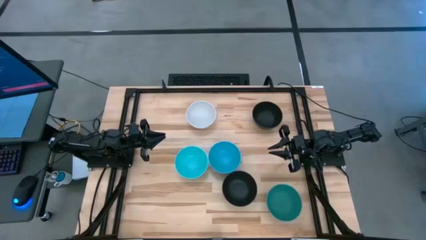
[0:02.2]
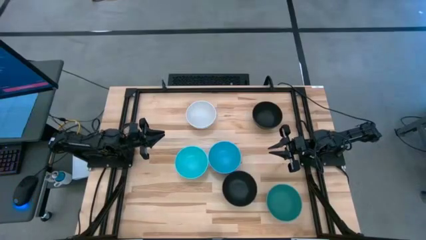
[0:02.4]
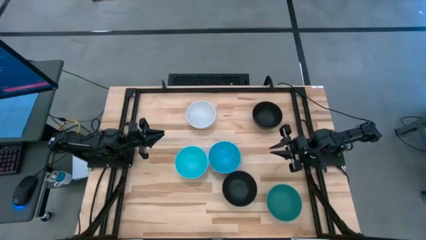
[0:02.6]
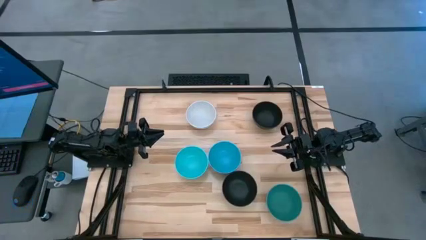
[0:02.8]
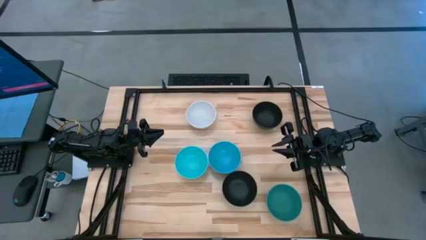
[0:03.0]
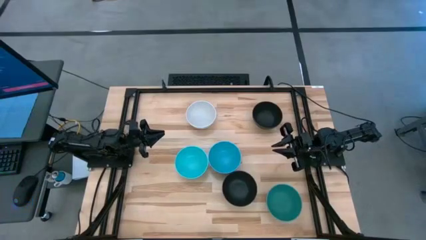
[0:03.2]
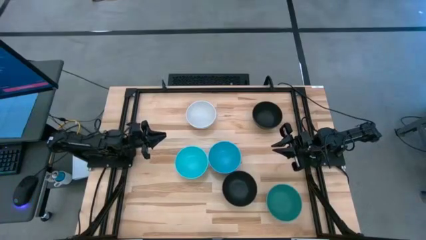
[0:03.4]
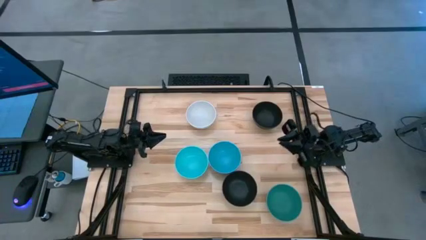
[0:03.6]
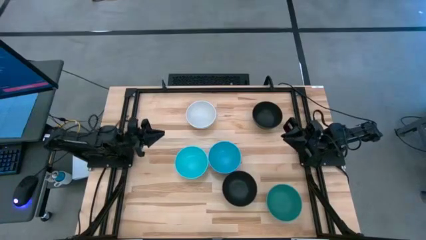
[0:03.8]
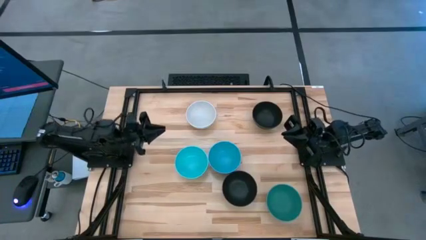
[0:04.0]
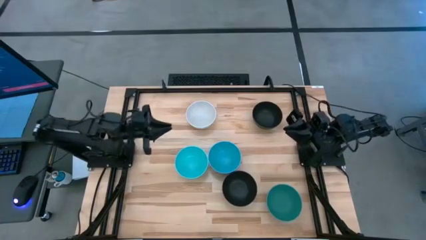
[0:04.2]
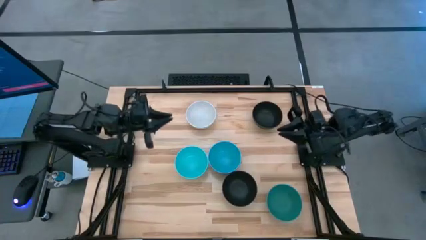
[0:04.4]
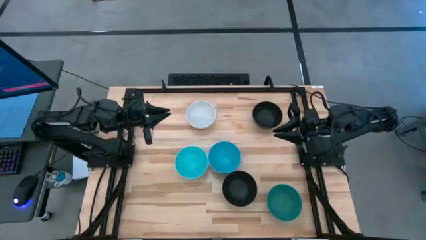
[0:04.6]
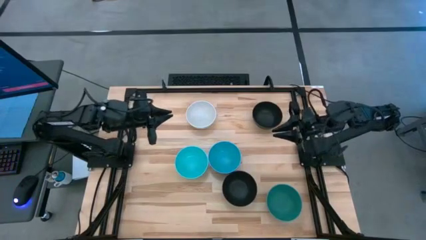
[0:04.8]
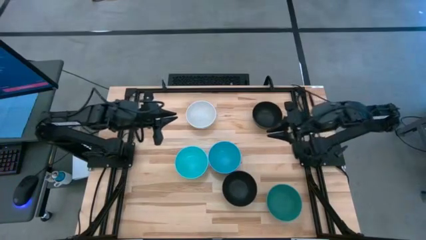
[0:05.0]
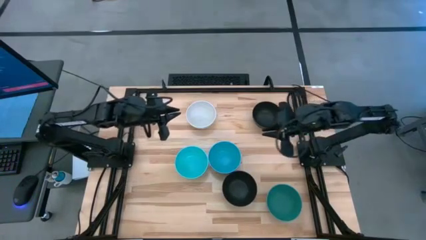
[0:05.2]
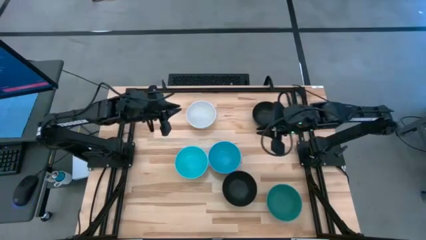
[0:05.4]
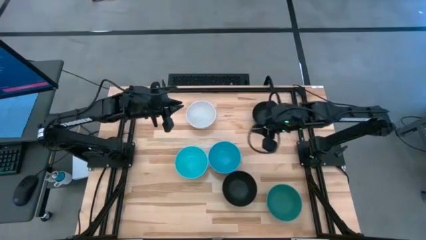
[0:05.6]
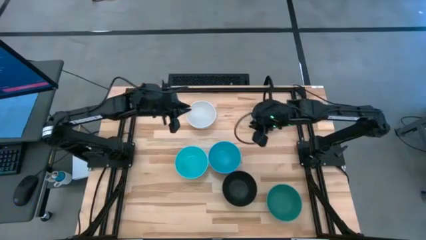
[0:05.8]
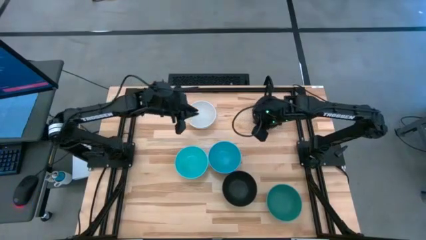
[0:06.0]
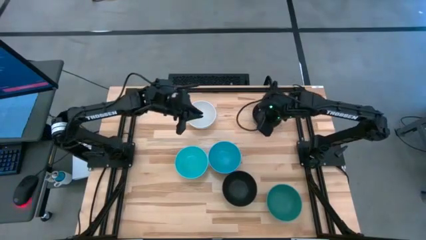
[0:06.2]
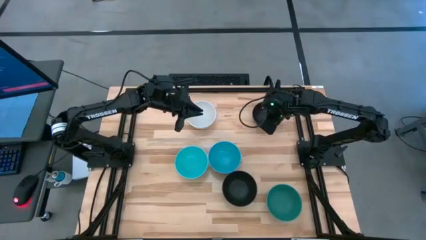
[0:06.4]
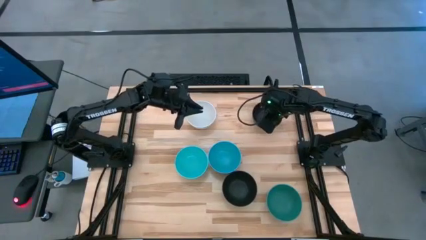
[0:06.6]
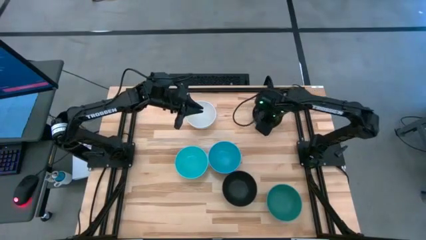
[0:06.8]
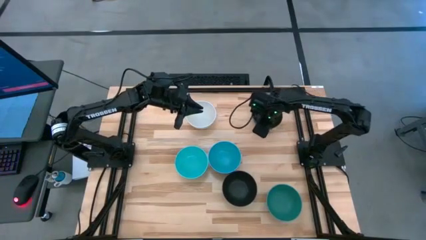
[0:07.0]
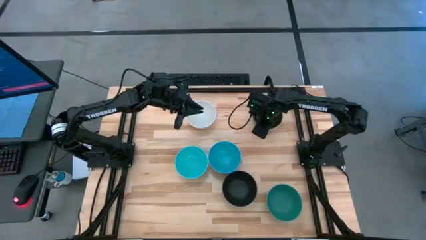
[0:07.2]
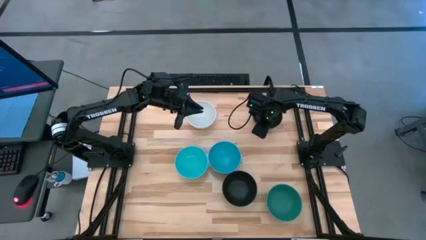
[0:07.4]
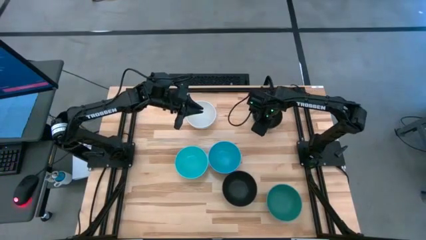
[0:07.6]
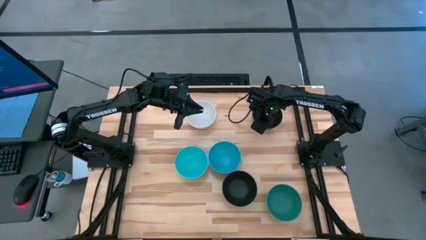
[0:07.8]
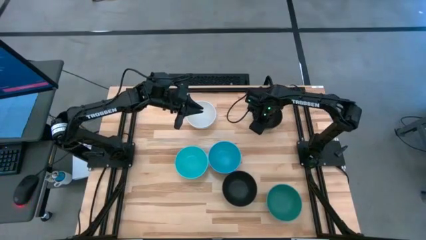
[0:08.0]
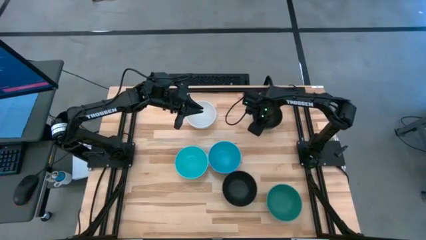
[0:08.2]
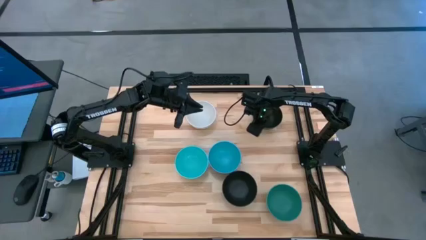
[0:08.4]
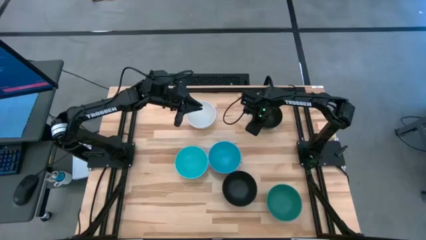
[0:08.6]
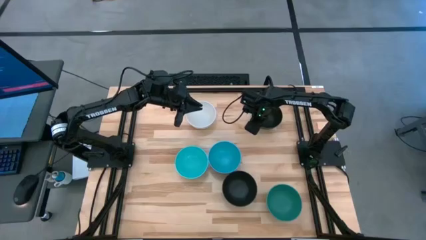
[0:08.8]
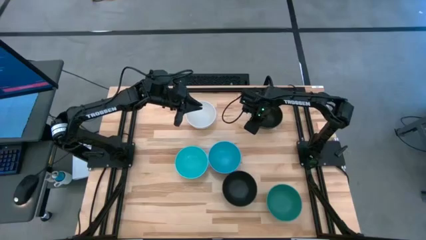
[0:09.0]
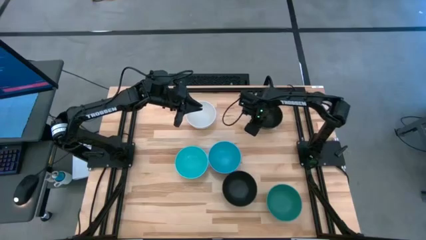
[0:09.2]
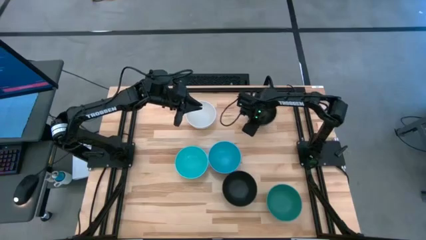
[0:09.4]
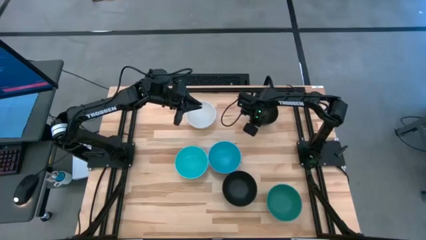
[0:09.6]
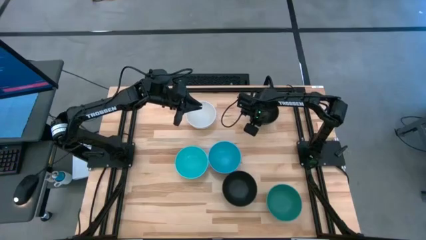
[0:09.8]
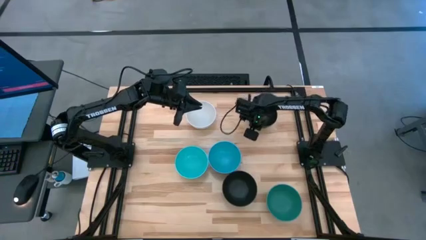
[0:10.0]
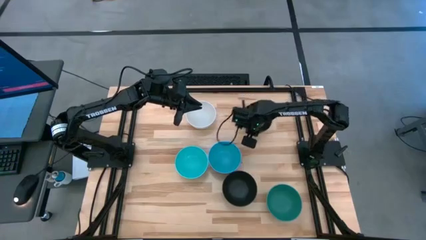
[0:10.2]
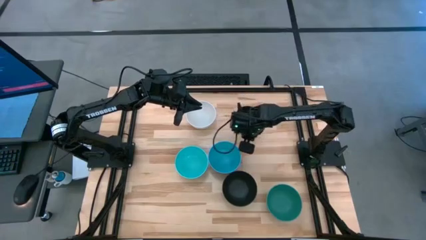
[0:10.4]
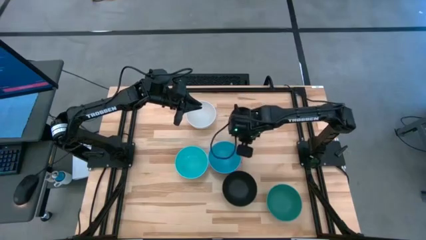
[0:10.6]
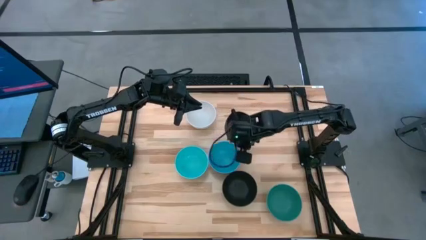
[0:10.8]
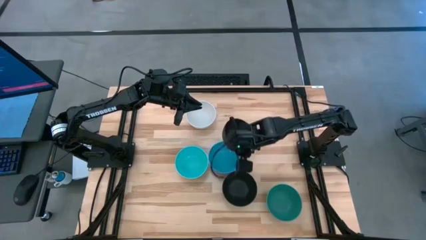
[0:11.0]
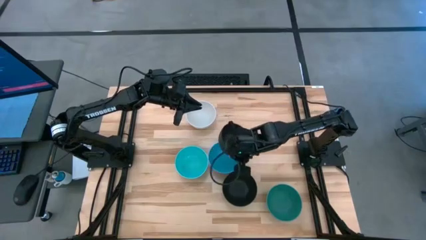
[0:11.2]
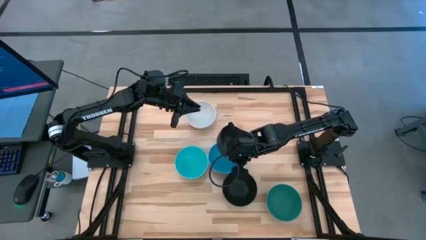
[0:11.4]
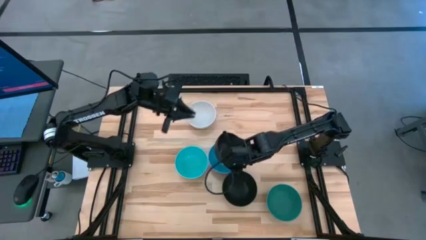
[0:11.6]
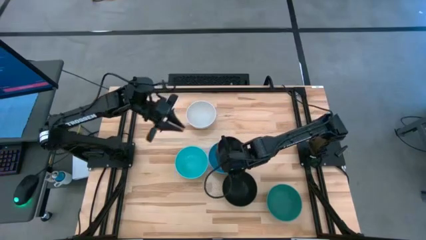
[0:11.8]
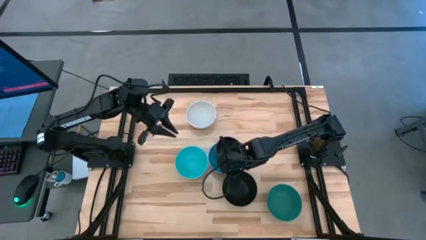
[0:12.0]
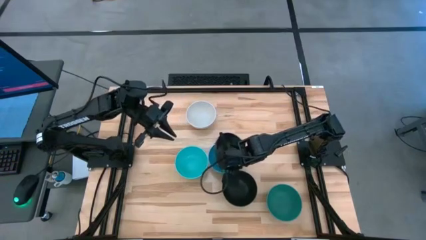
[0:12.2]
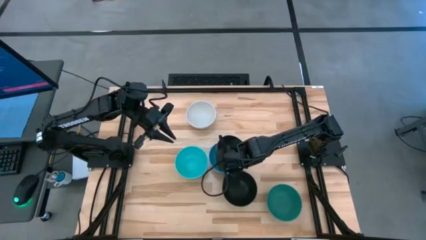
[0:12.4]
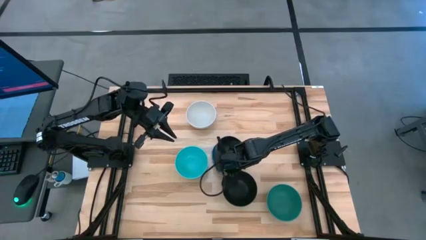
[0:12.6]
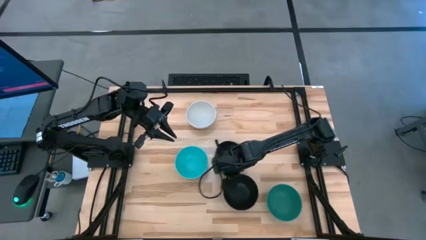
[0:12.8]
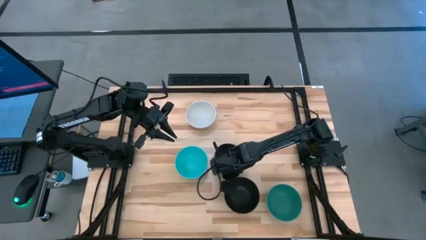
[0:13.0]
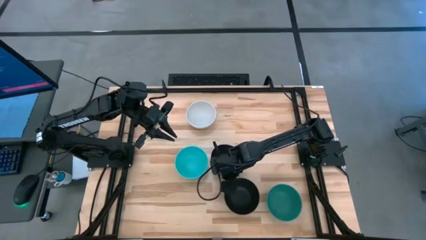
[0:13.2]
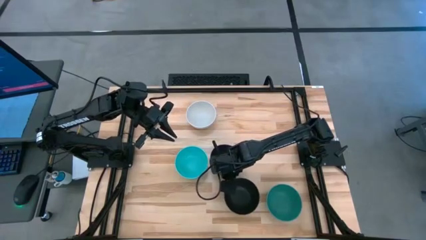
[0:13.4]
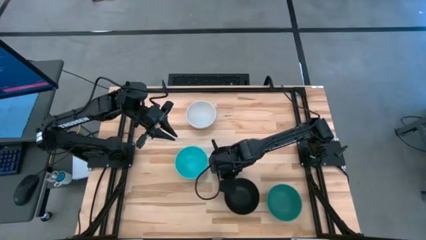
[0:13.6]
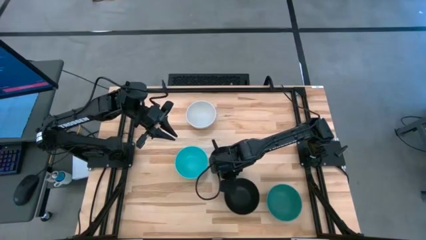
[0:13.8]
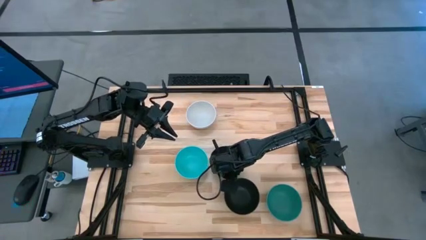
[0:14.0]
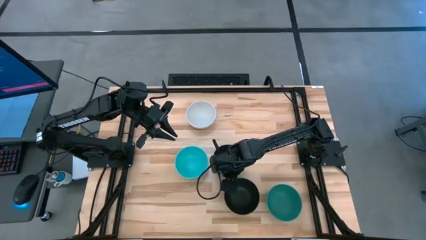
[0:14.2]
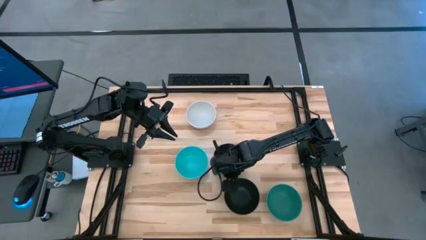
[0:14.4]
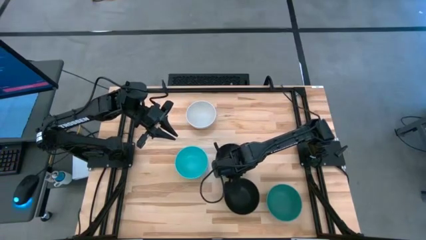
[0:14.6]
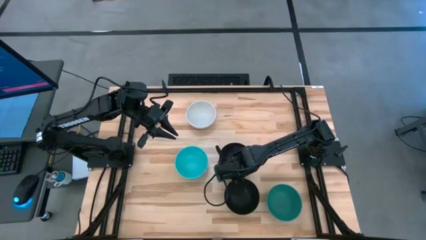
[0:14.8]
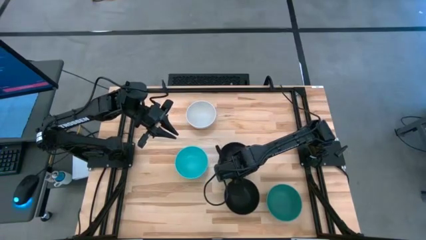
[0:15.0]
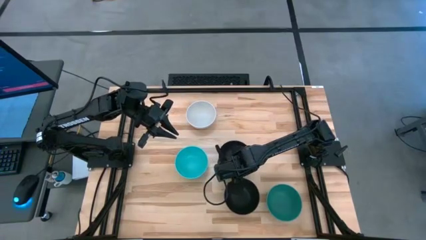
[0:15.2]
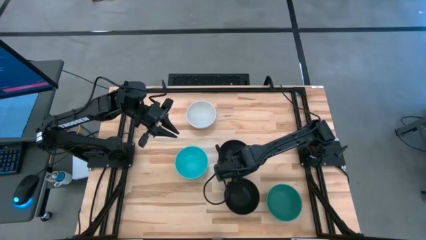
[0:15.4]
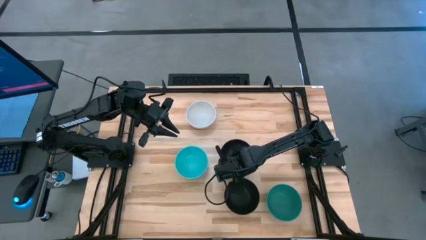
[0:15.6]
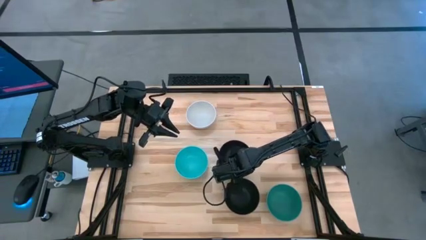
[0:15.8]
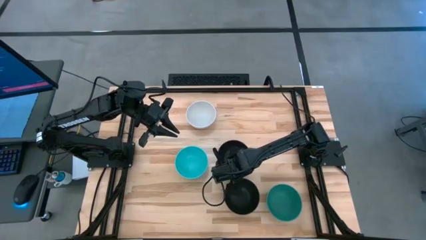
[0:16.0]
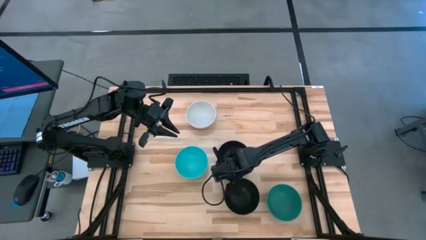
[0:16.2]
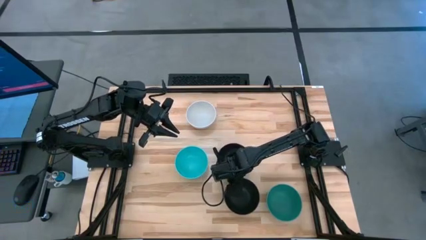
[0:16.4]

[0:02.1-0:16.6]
Task: Nest bowls inside each other
Stack the top black bowl on top of the blue bowl
